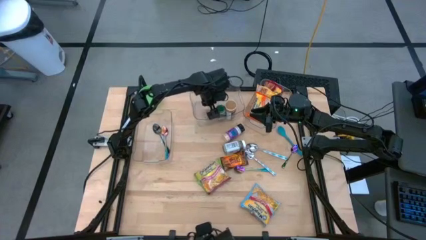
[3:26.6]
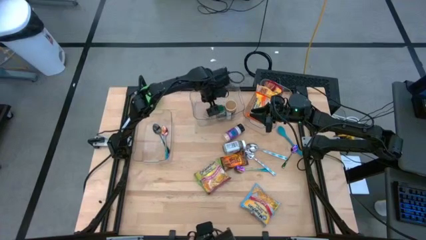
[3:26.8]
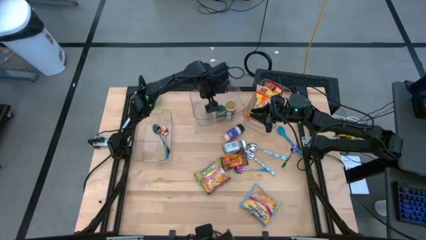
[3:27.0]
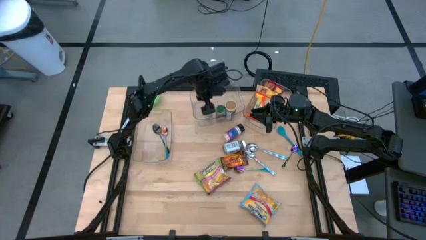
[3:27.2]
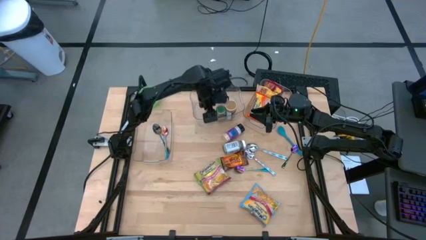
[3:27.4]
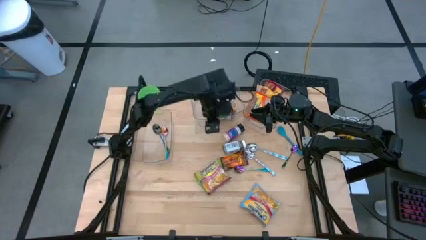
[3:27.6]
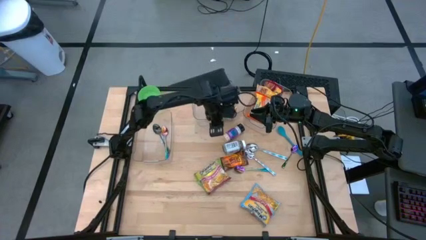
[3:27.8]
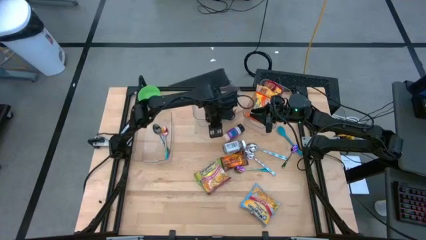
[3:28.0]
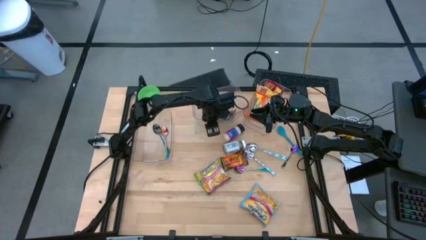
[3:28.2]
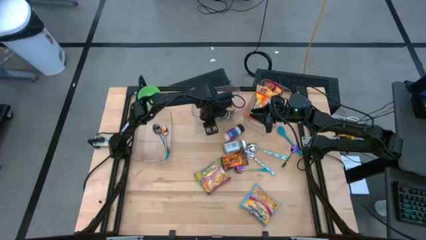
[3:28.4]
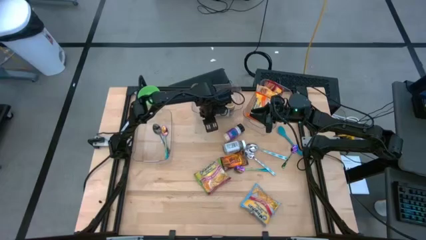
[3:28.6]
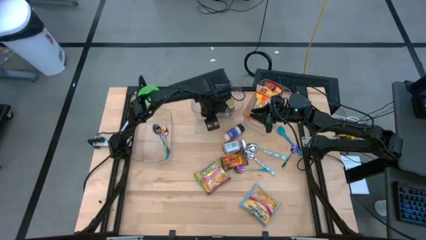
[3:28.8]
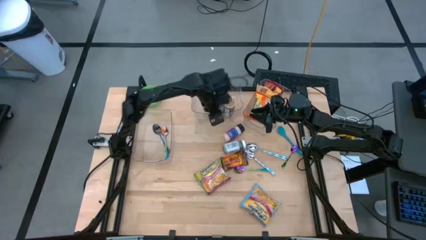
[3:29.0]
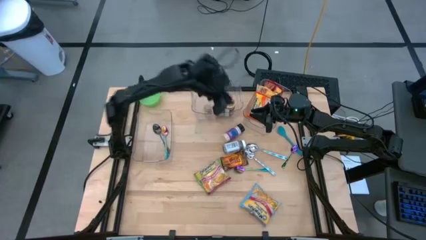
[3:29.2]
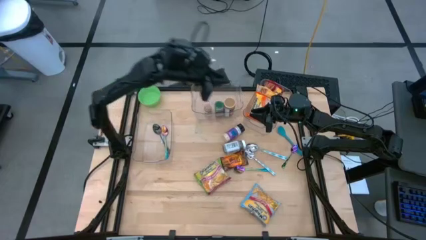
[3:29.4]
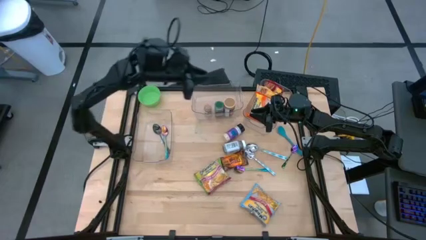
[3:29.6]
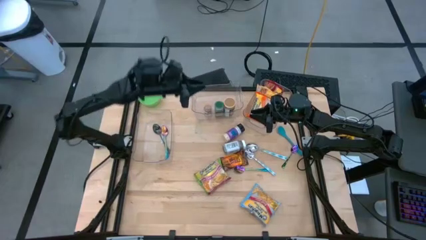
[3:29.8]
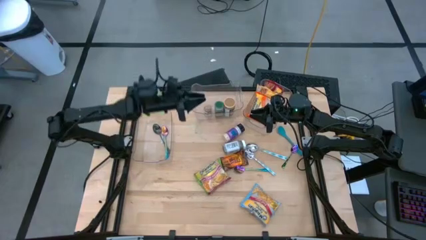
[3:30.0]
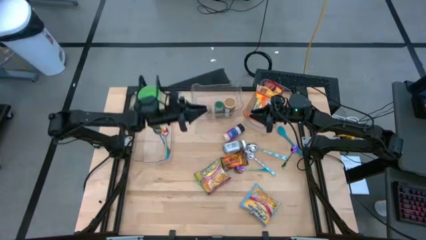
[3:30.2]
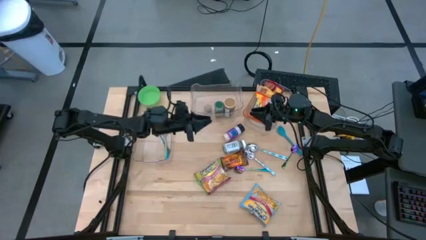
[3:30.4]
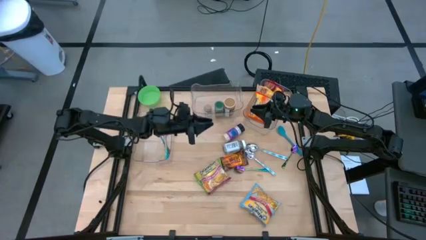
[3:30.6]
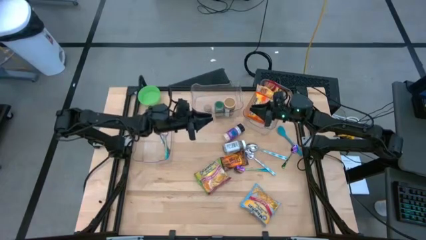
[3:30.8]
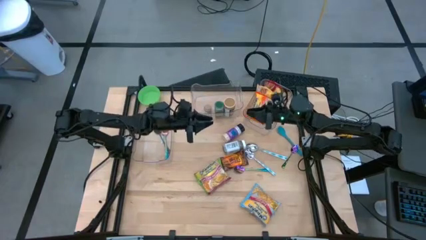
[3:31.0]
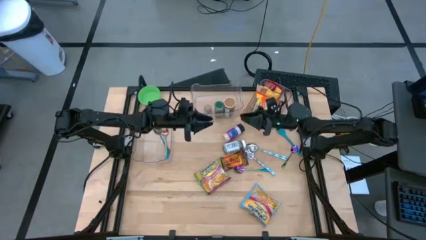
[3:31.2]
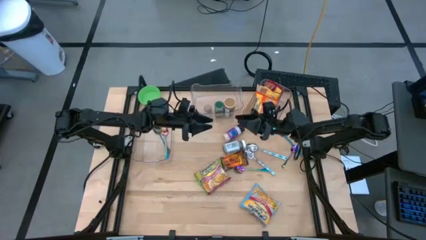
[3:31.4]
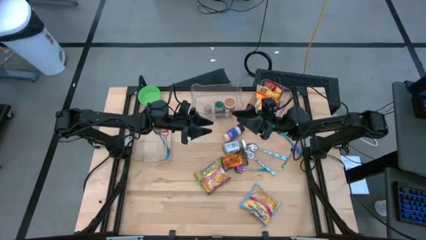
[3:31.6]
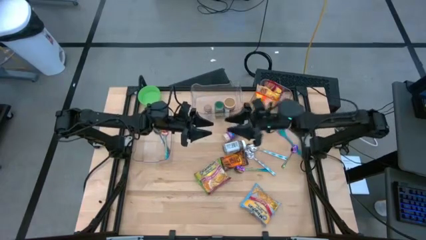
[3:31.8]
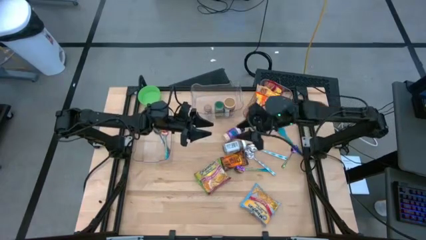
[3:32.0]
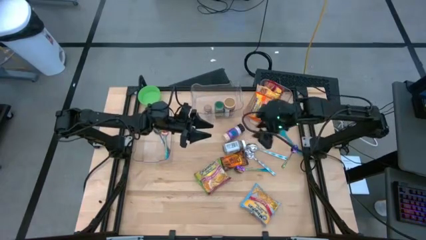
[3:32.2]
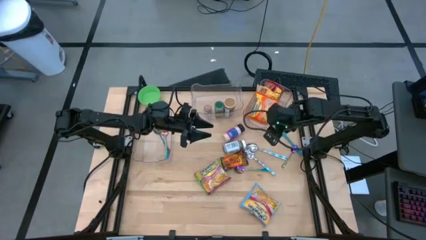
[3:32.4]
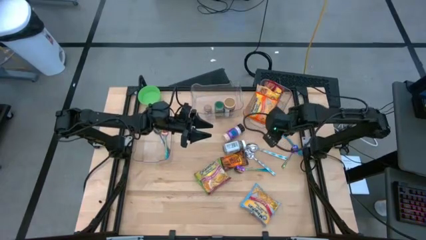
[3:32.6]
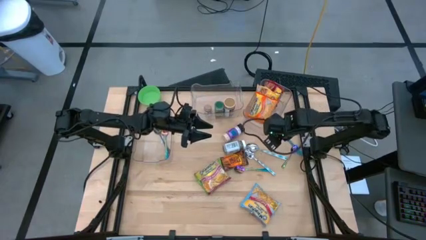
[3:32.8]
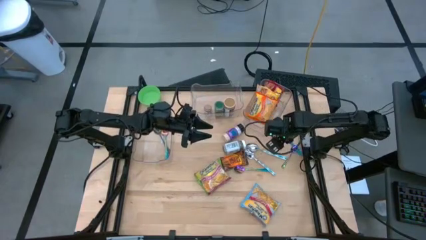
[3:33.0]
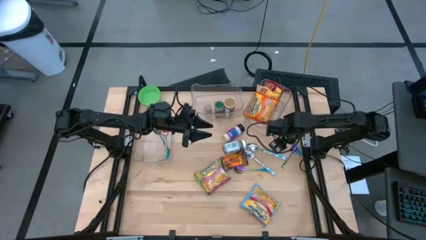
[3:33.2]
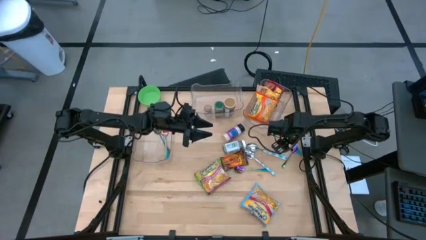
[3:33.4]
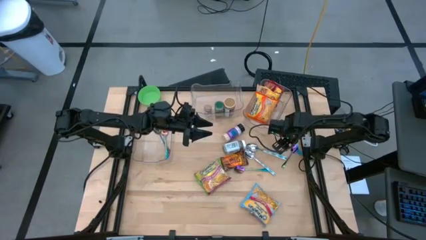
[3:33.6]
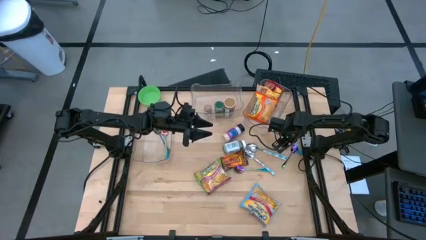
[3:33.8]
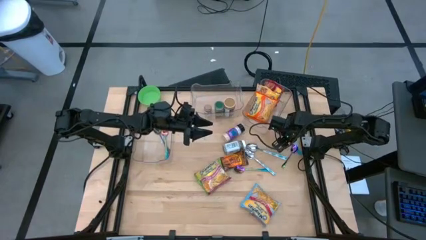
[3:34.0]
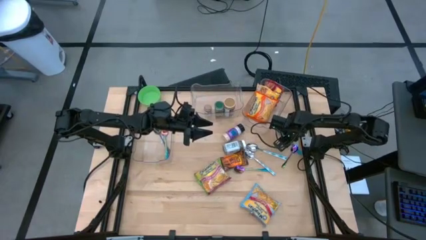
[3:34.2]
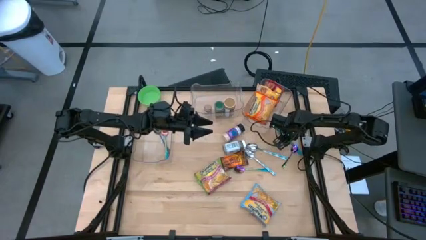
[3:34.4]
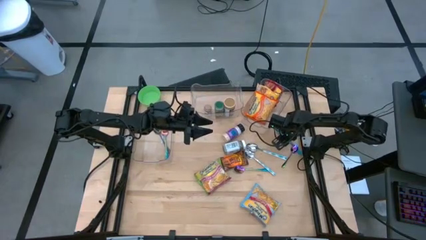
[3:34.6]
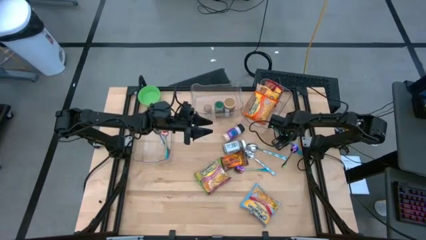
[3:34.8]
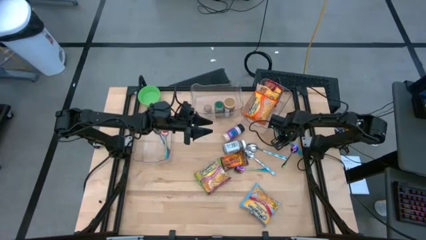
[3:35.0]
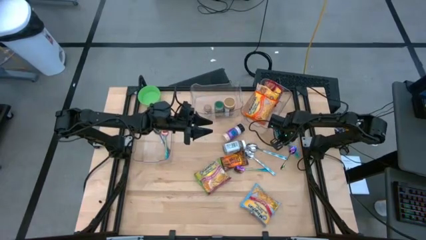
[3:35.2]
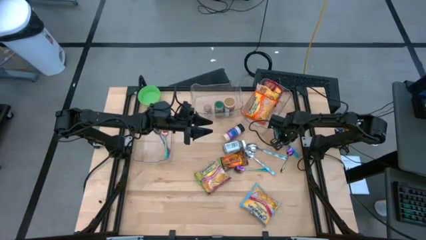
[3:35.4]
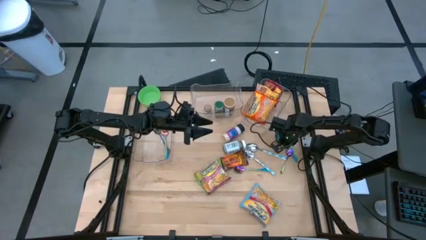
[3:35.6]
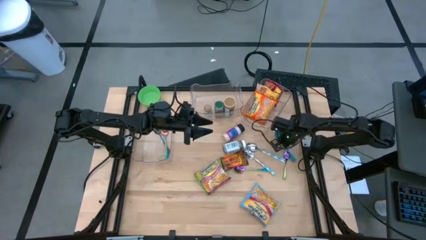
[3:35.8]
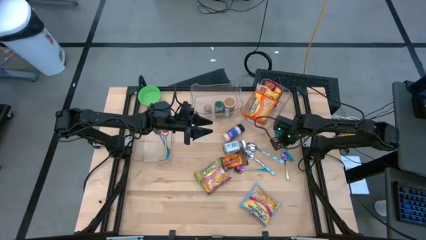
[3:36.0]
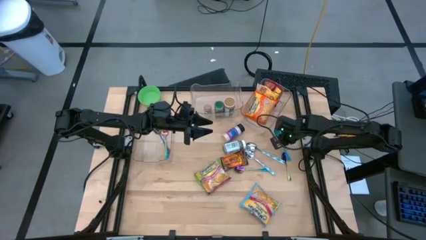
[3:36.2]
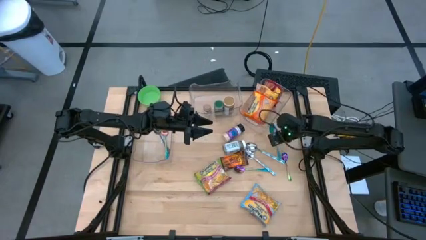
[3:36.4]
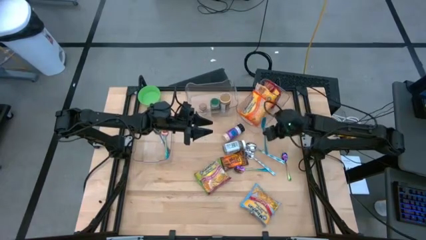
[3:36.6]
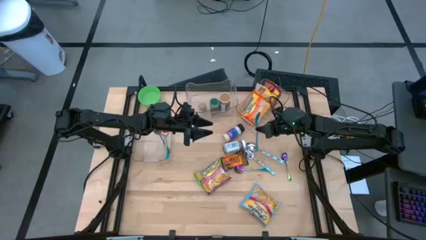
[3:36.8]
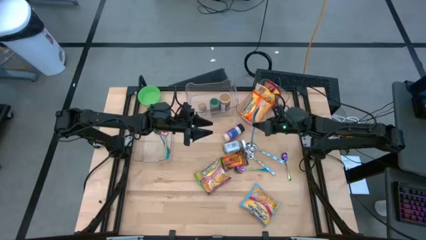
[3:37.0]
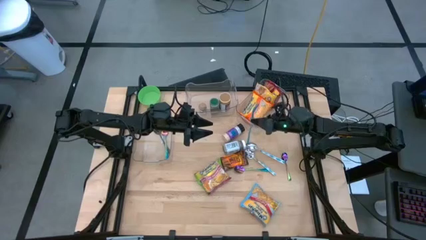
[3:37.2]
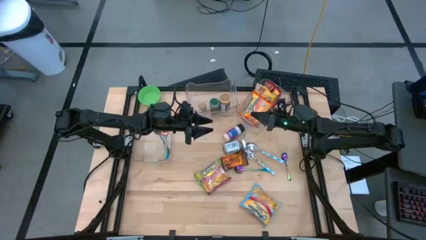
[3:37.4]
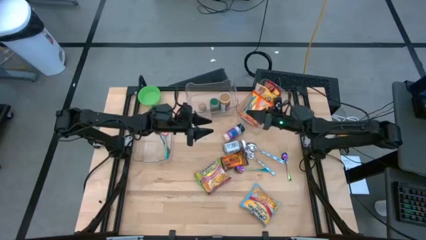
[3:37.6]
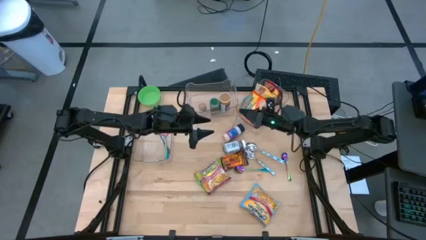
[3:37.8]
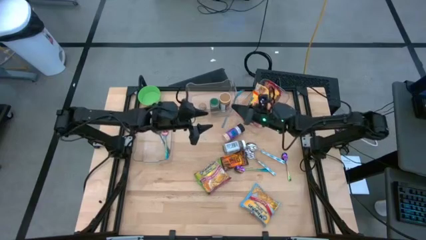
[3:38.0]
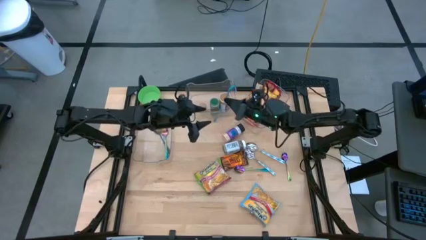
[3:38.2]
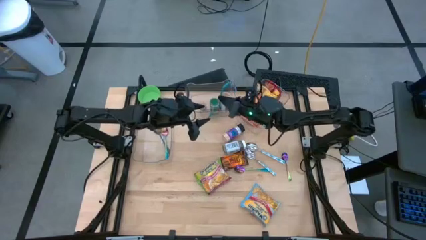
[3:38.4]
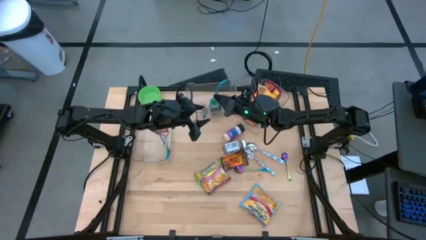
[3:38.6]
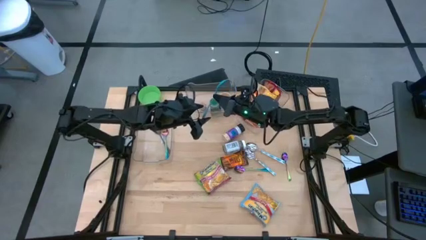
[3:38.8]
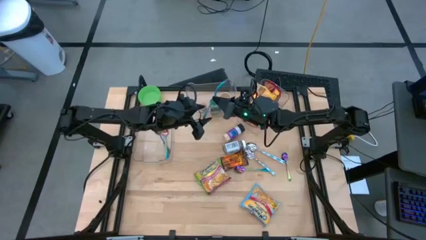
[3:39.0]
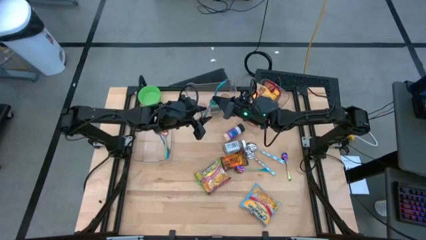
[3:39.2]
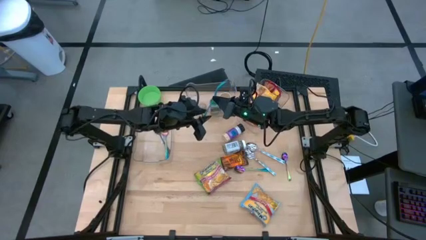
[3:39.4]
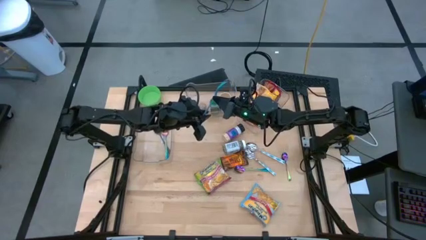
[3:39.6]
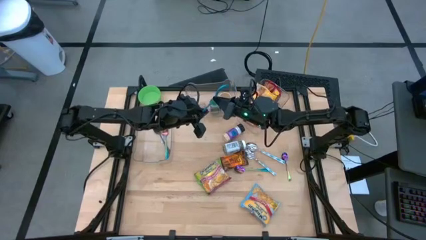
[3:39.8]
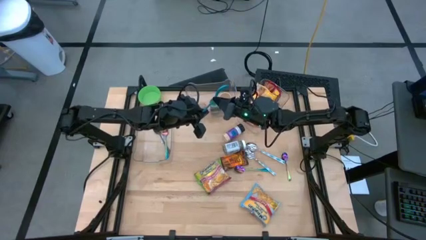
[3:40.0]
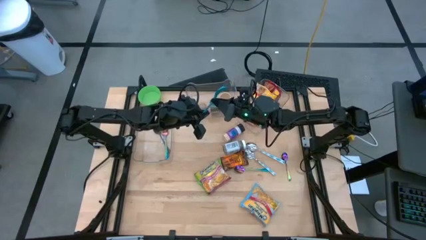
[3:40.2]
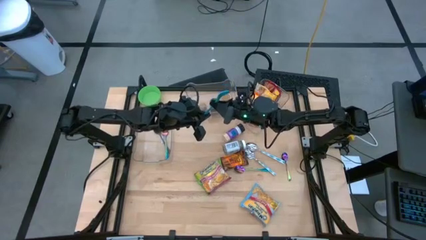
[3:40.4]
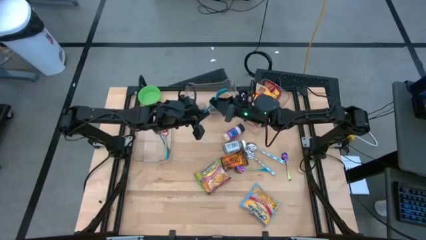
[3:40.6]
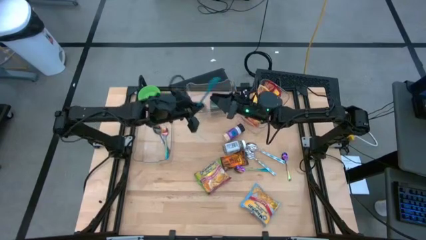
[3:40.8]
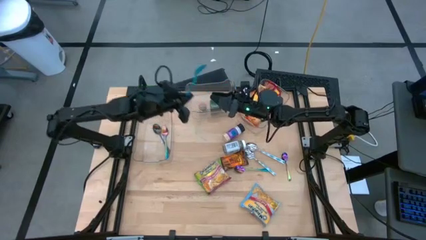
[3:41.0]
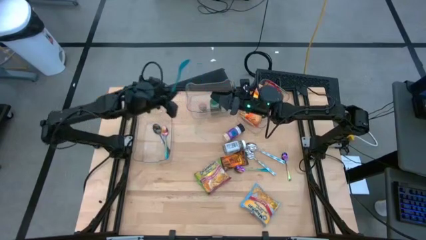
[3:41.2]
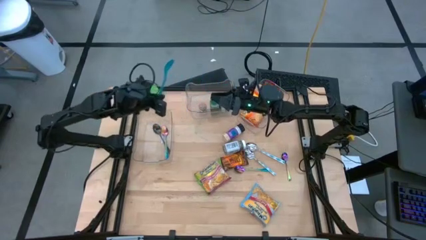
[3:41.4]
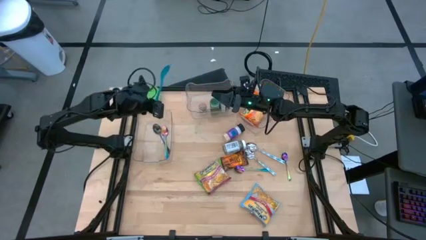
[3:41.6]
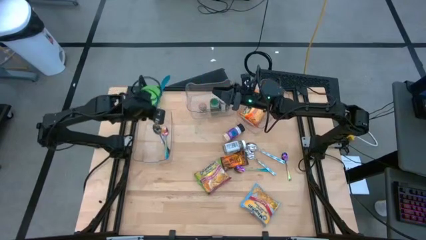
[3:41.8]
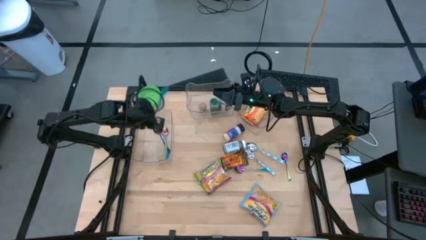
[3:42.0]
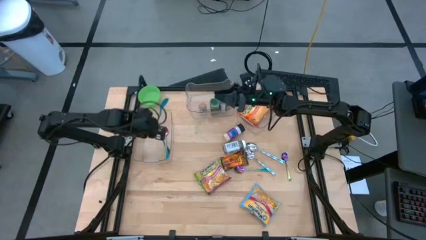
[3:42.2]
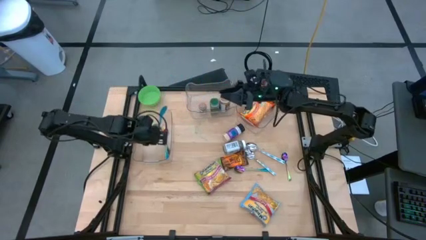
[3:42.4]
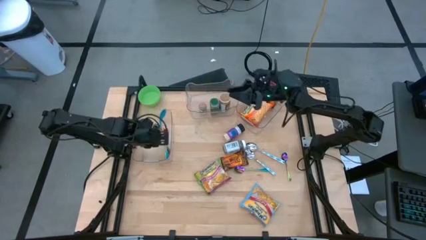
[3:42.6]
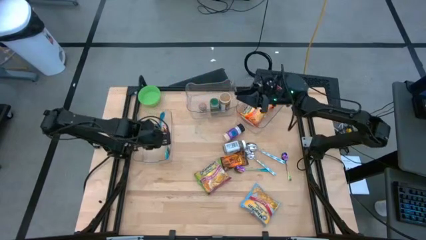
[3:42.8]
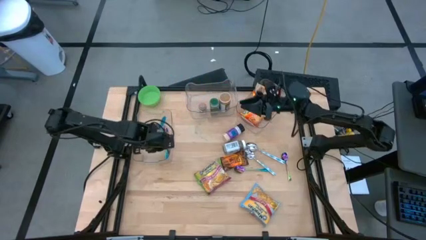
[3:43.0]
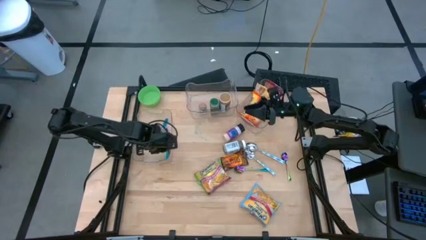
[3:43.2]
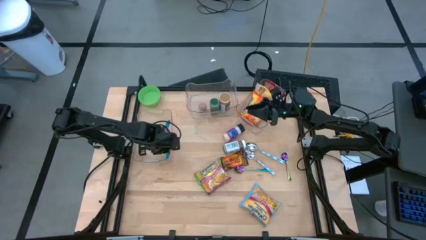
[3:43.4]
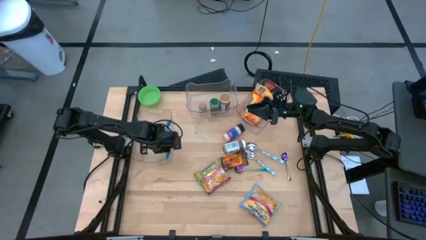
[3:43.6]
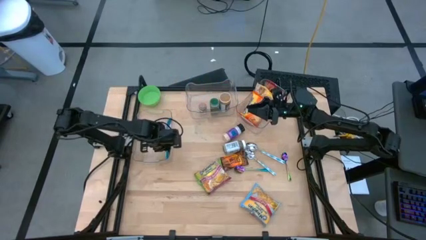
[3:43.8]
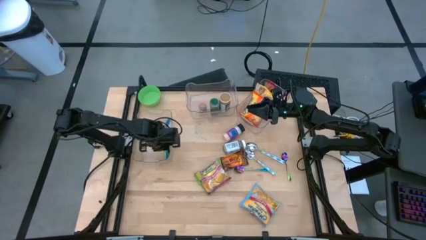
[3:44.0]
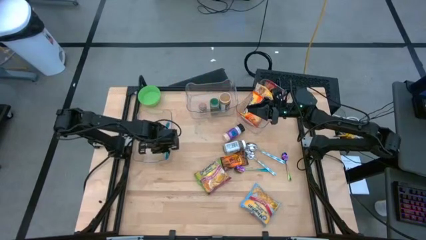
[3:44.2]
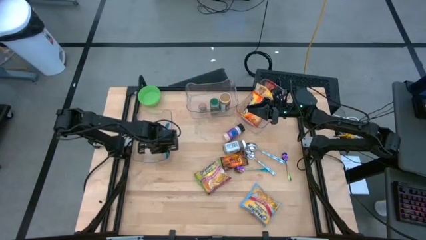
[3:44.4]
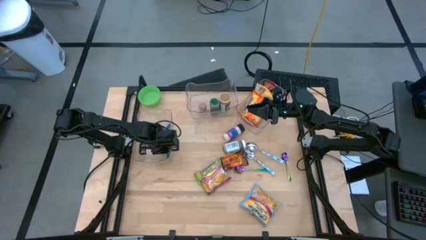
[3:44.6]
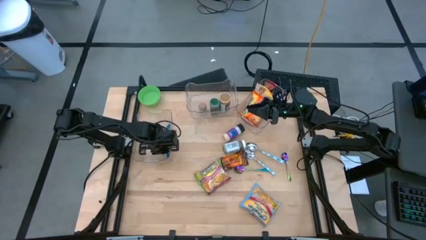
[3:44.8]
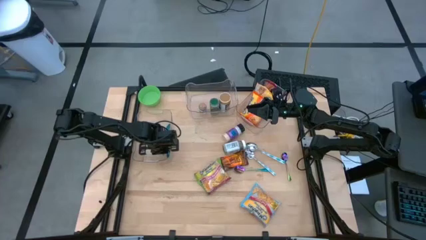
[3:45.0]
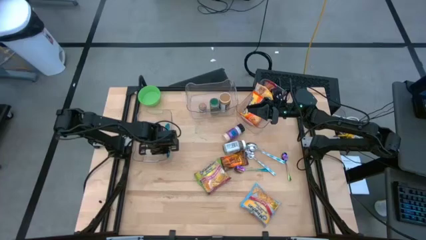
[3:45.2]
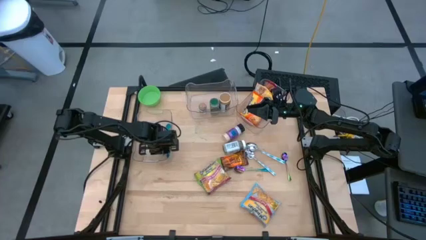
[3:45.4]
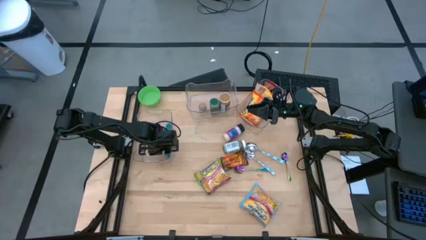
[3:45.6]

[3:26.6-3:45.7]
Task: Pick & Place Food Item
Put the blue spoon into the left transparent bin
